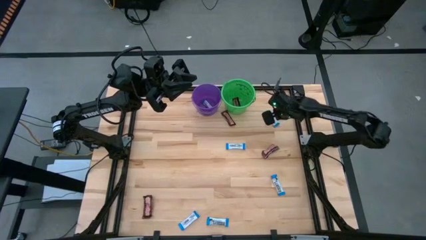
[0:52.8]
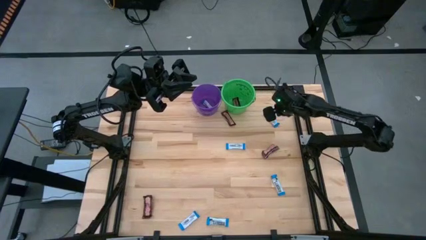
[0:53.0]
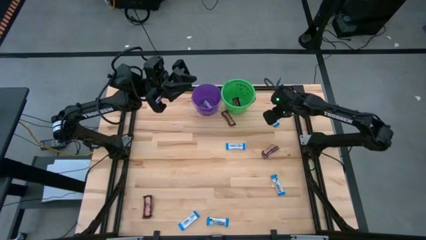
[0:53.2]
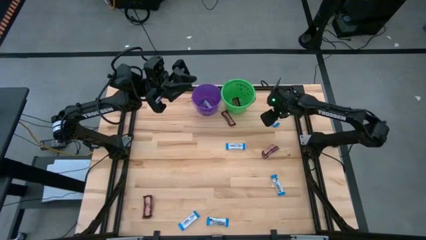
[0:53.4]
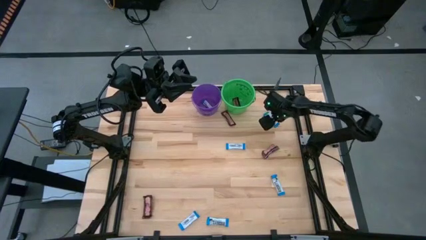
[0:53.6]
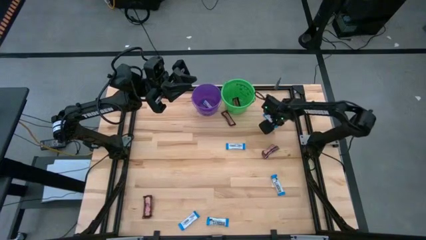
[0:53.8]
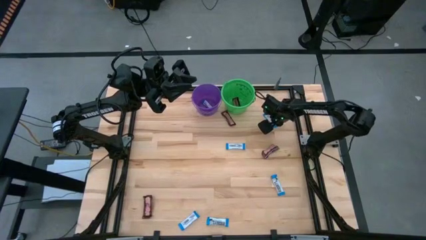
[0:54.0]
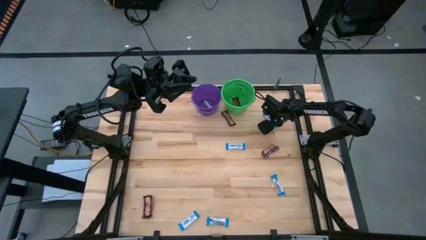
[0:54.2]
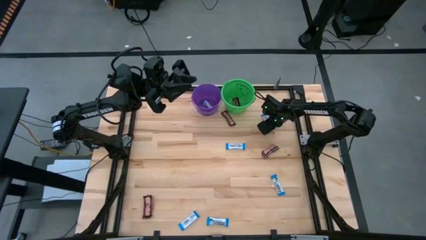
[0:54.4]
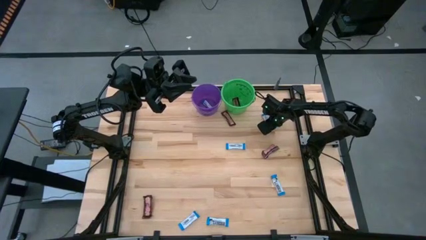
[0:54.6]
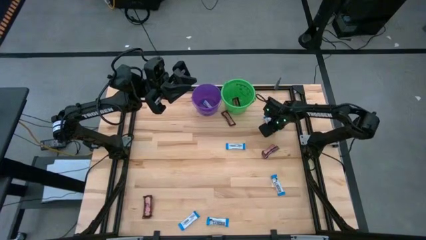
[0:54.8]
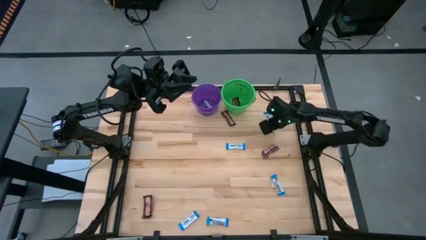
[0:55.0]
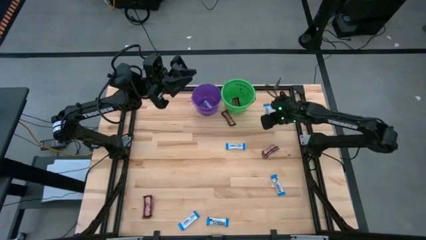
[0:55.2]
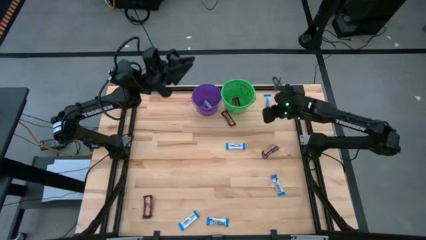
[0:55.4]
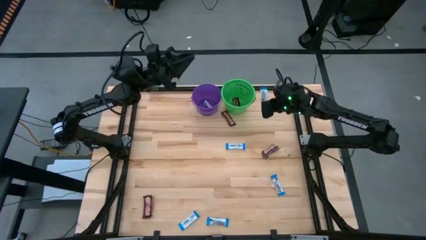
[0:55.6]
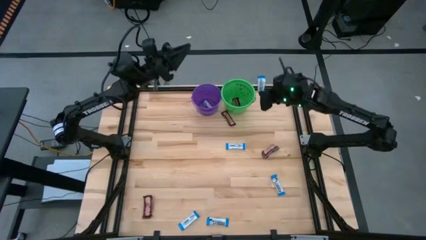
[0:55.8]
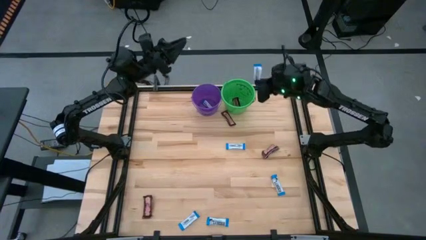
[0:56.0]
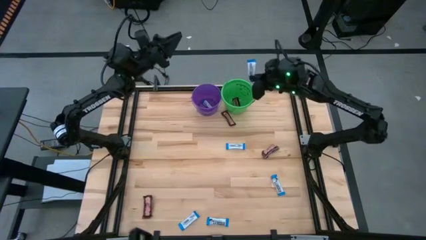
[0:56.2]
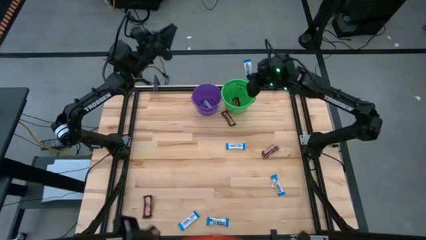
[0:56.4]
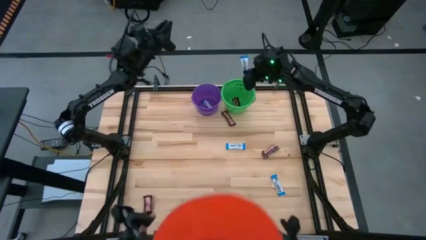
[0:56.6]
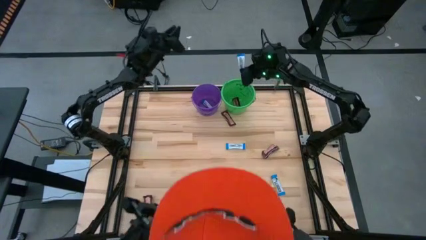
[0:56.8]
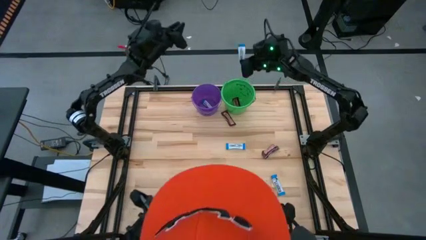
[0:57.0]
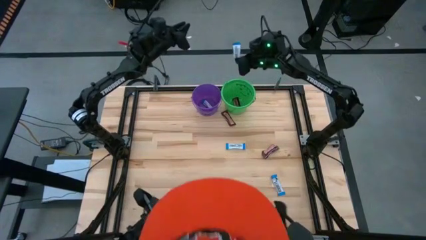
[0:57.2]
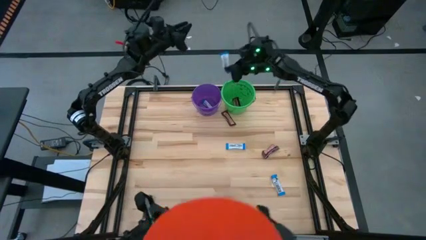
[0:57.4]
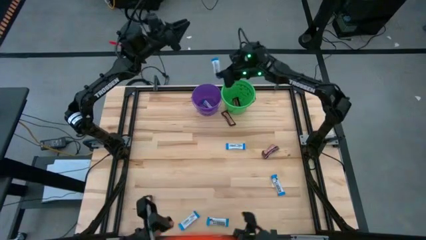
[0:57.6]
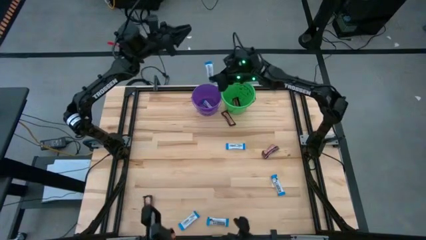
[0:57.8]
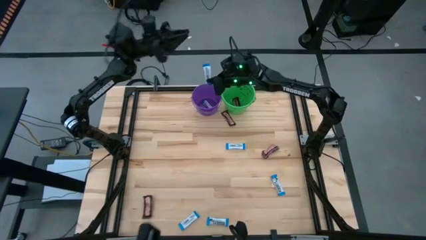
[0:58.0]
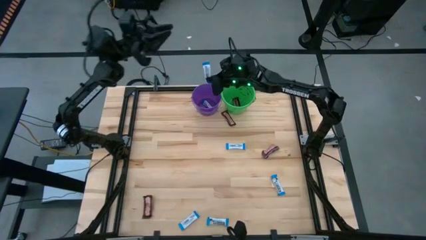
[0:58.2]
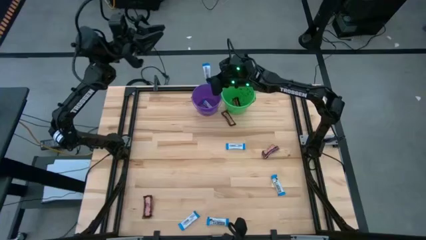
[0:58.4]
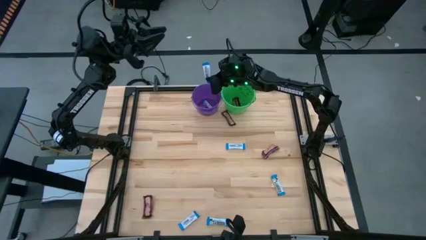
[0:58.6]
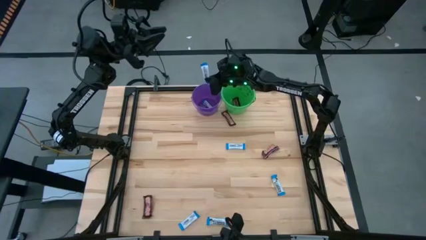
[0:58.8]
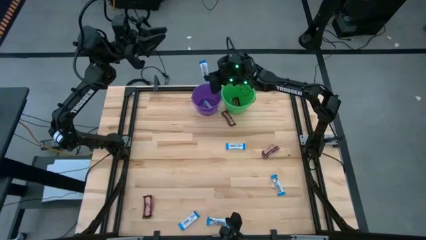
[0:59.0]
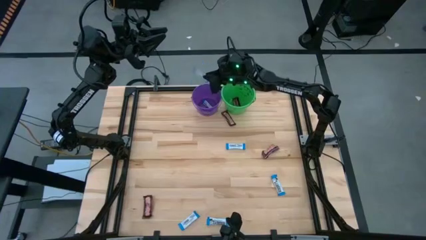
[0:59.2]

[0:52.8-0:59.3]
Task: Sort candy by brand, put in halloween buckets
Put the white chocolate bar into the purple bucket

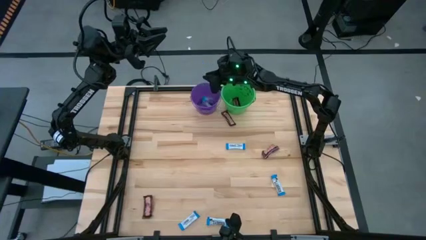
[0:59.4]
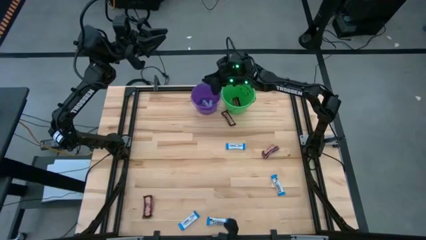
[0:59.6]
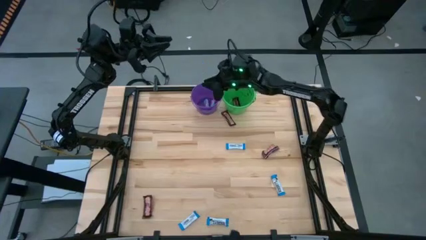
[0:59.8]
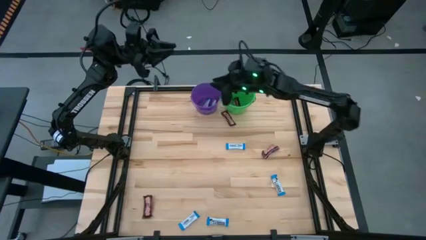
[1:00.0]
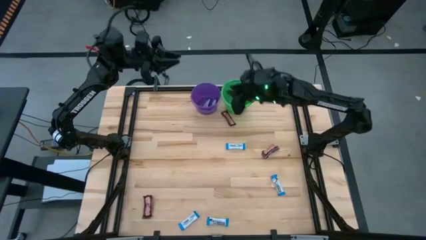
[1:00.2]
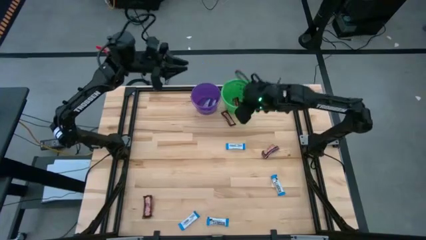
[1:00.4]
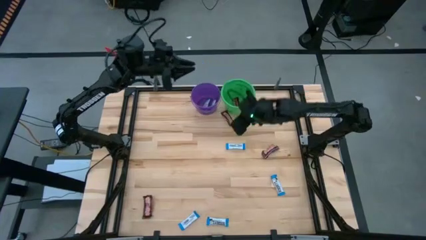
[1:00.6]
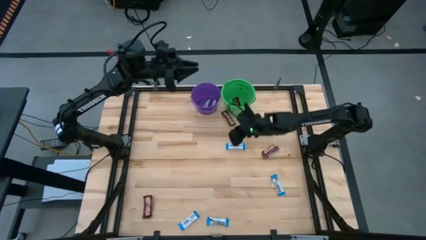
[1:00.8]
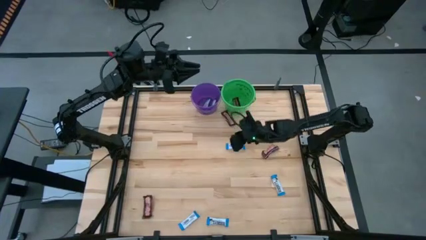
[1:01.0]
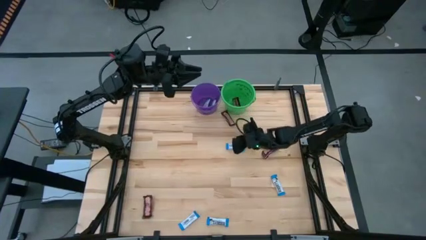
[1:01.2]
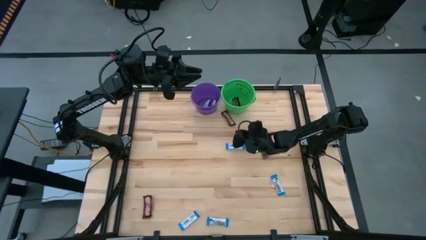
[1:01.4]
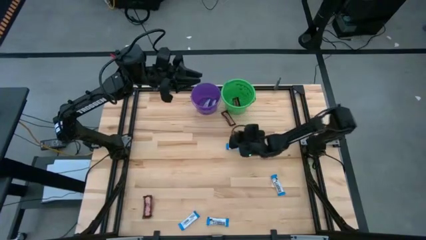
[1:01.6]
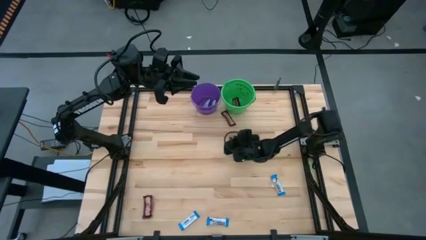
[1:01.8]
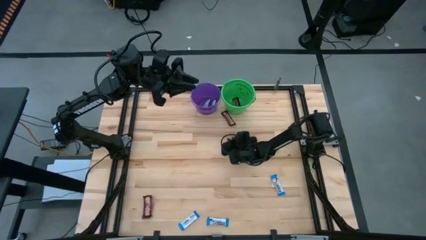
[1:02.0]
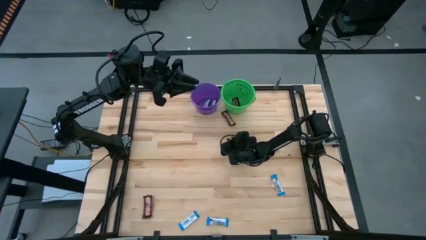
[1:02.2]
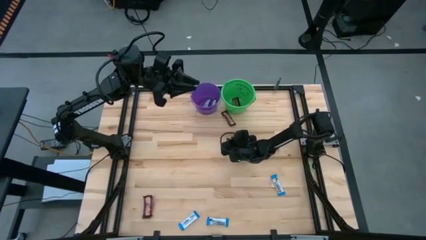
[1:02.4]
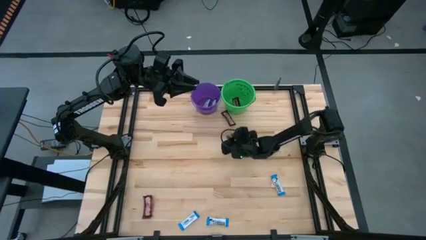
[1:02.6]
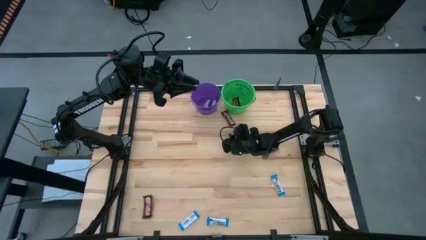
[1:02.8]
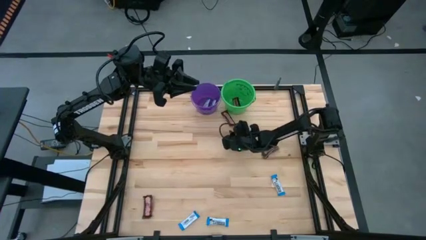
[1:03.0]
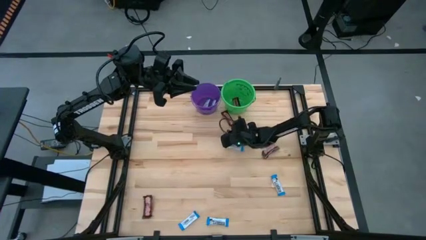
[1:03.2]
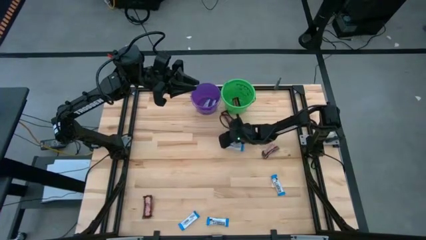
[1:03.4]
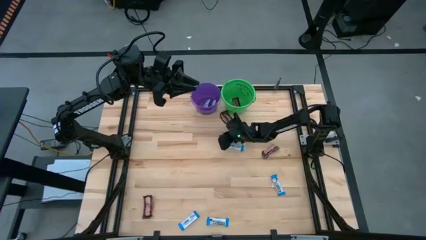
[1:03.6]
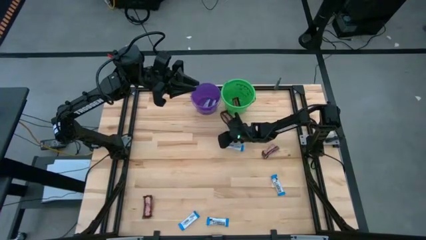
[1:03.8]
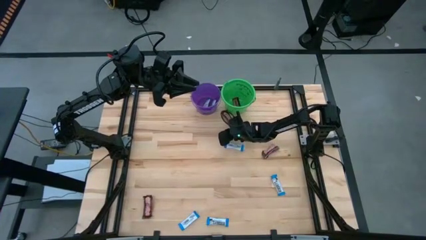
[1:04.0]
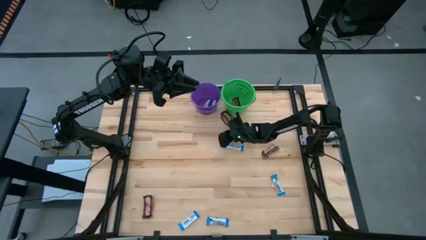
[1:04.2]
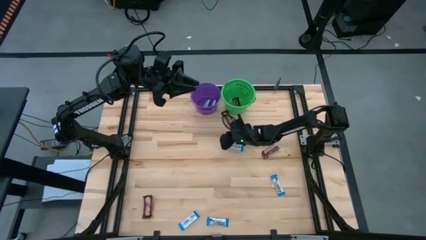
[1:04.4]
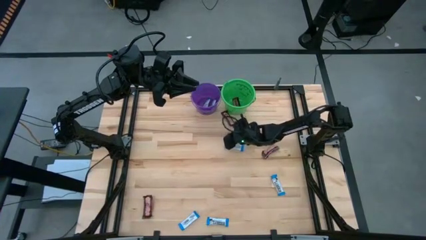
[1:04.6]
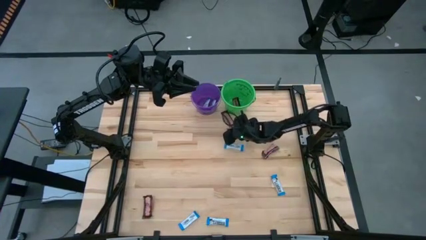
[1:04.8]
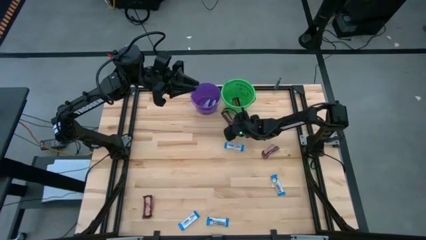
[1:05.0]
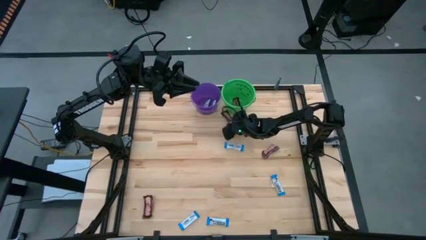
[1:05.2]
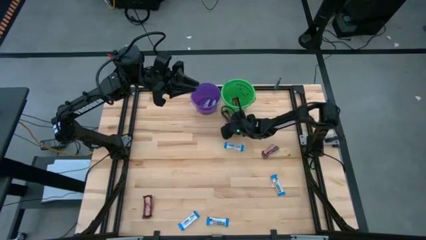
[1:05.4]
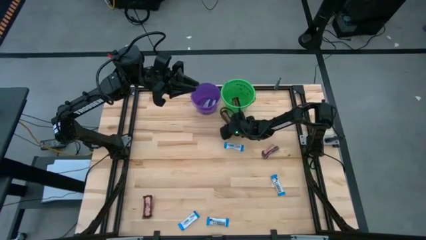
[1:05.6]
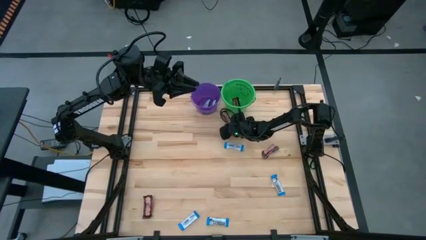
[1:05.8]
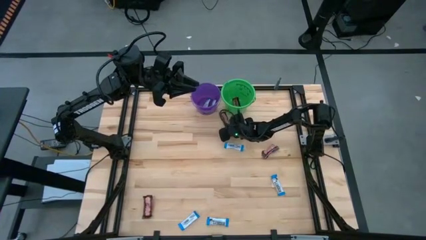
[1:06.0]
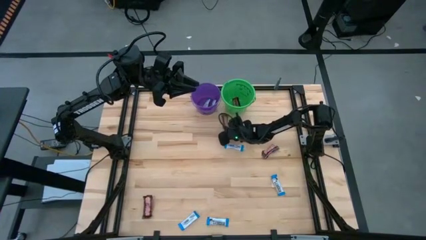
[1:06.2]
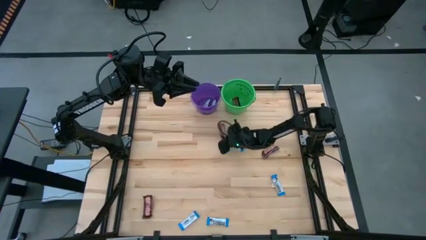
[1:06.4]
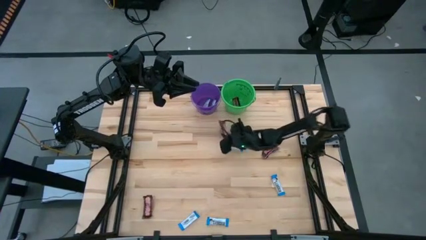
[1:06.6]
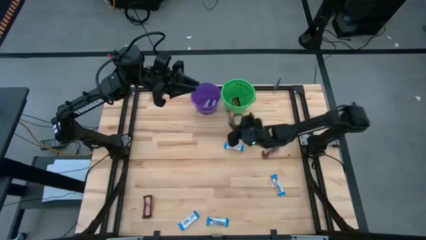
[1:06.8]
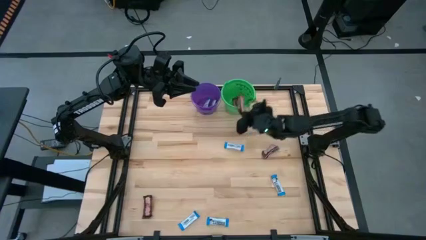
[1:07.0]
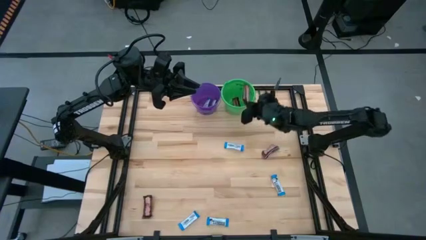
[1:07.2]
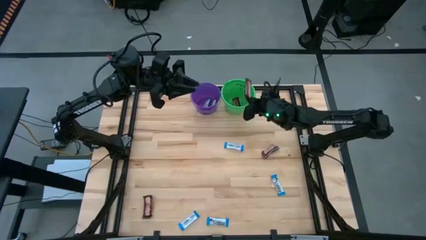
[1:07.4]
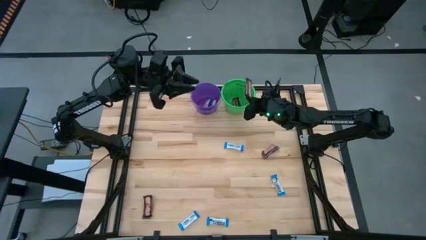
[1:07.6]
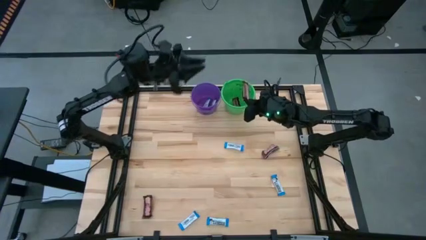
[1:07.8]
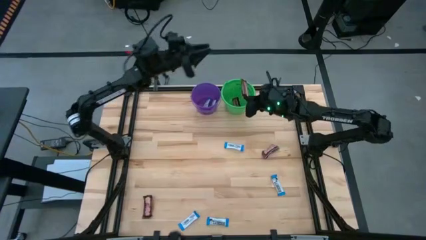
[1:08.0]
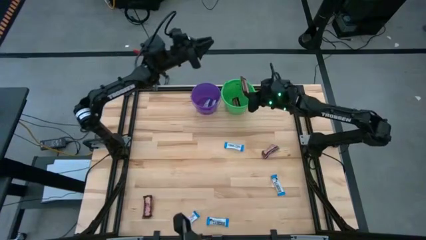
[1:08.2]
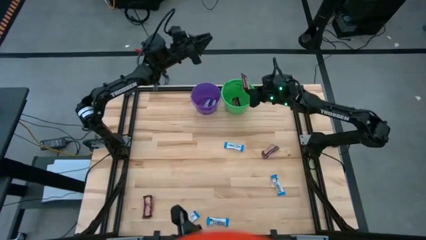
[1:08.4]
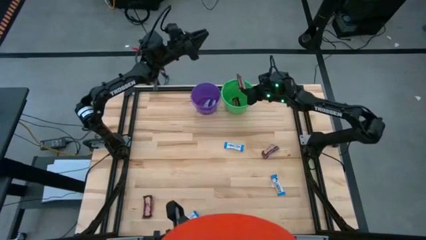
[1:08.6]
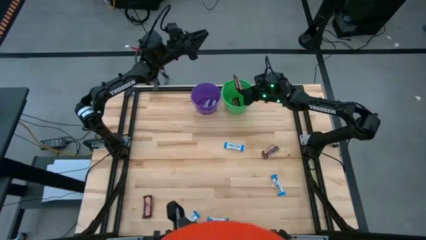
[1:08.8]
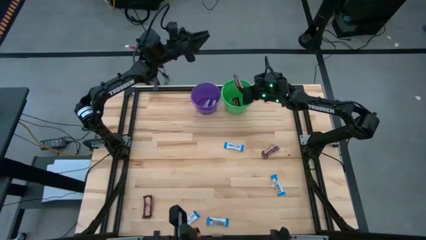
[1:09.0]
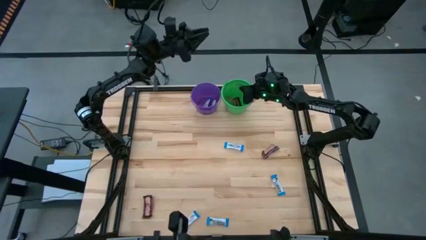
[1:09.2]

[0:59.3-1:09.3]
Put the brown chocolate bar into the green bucket
